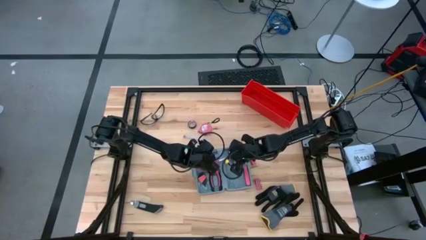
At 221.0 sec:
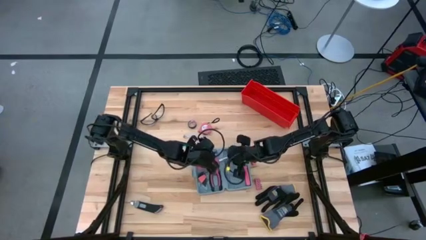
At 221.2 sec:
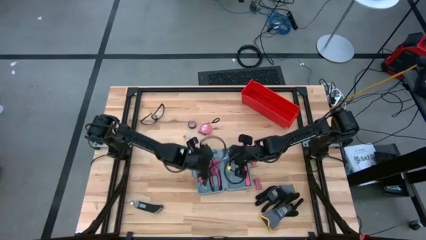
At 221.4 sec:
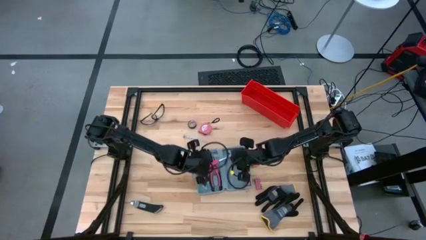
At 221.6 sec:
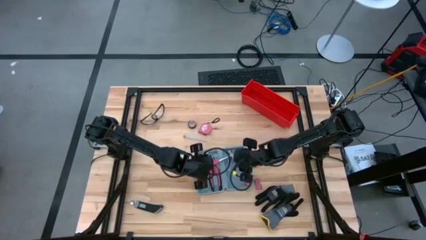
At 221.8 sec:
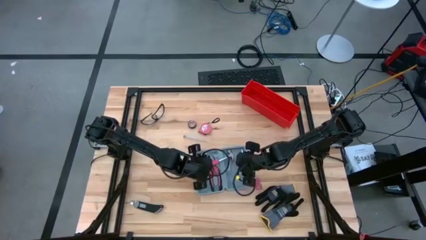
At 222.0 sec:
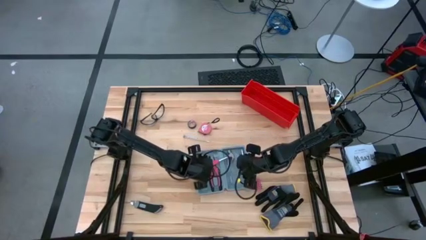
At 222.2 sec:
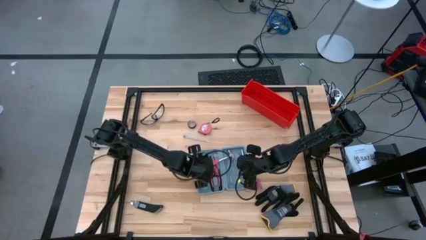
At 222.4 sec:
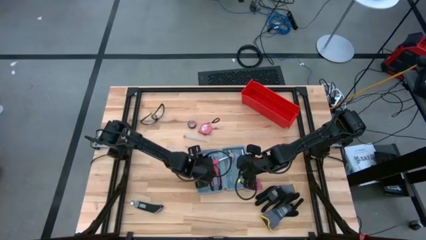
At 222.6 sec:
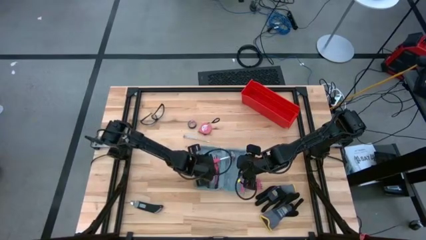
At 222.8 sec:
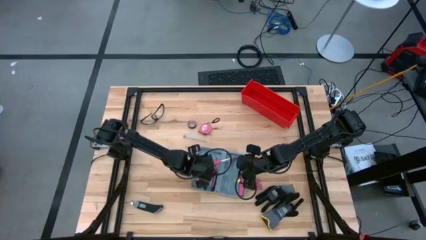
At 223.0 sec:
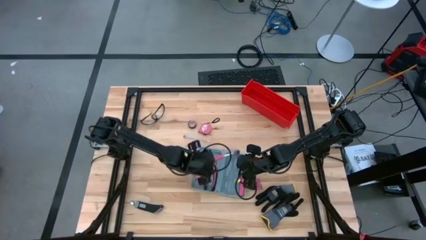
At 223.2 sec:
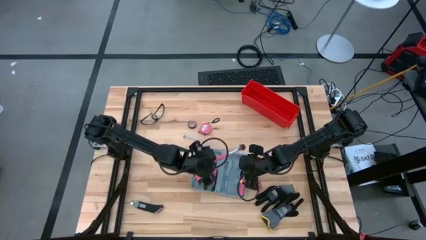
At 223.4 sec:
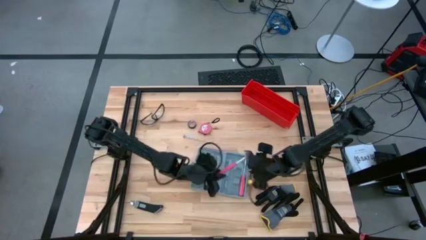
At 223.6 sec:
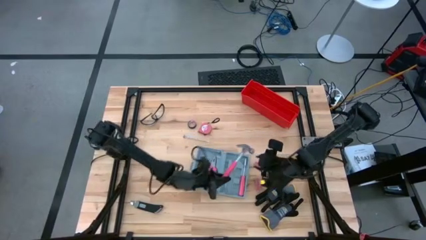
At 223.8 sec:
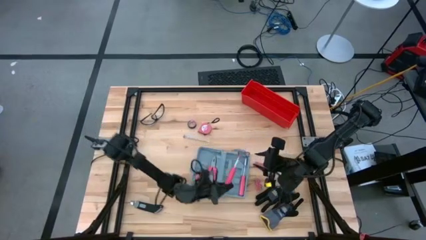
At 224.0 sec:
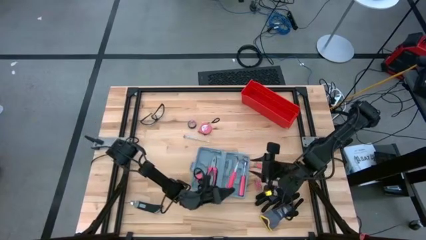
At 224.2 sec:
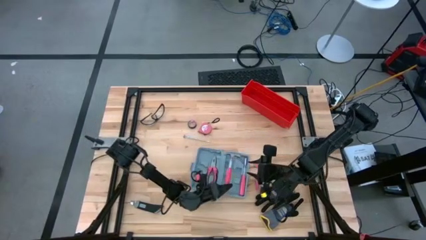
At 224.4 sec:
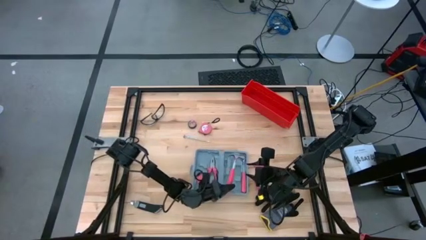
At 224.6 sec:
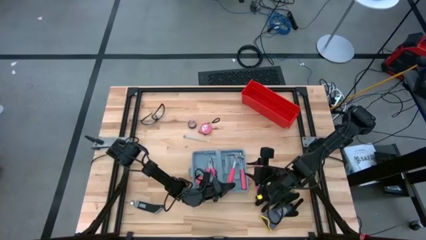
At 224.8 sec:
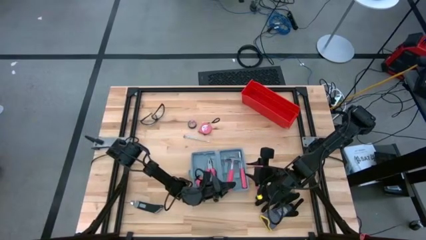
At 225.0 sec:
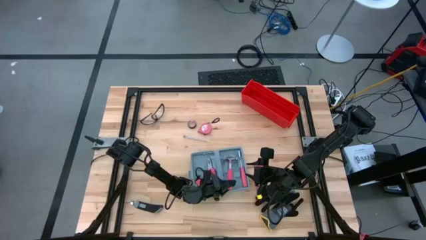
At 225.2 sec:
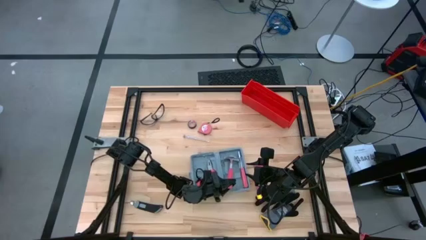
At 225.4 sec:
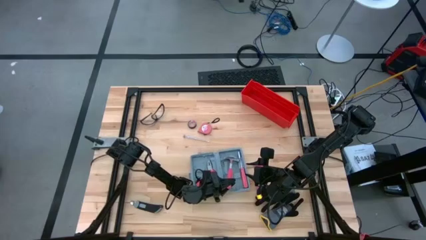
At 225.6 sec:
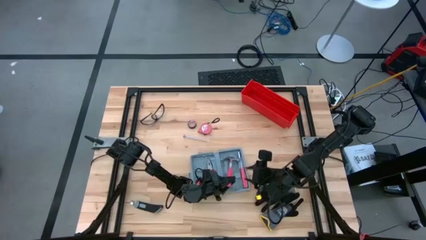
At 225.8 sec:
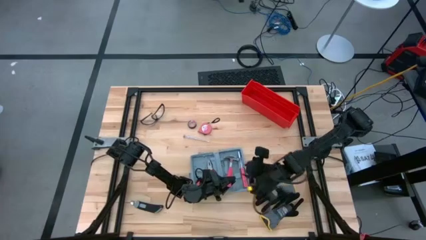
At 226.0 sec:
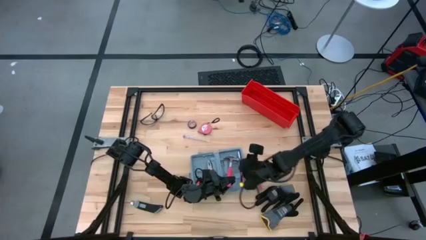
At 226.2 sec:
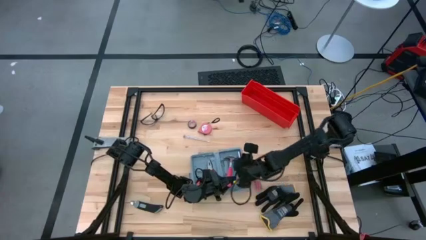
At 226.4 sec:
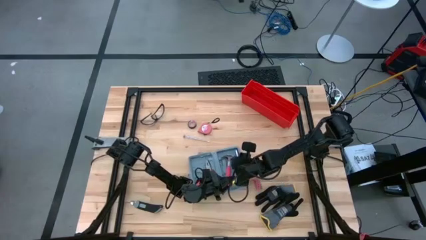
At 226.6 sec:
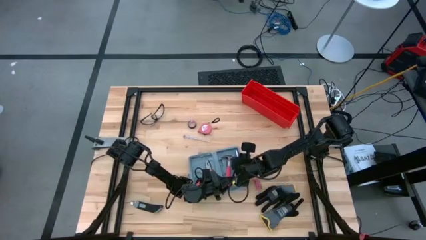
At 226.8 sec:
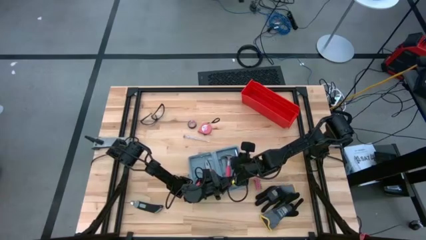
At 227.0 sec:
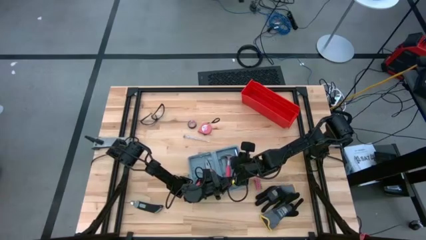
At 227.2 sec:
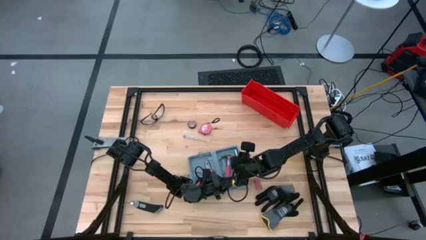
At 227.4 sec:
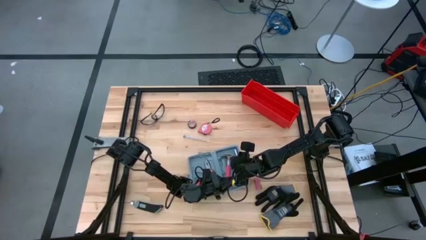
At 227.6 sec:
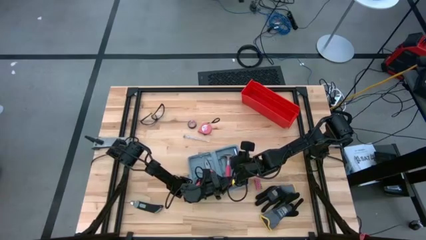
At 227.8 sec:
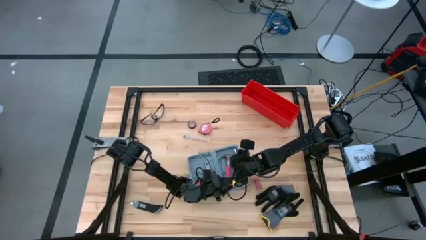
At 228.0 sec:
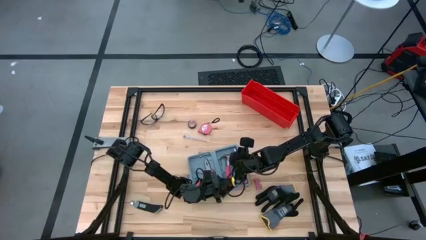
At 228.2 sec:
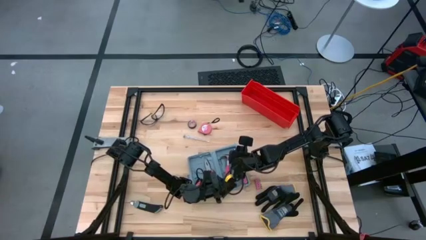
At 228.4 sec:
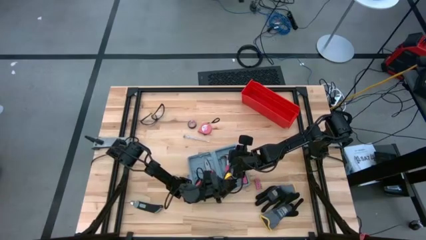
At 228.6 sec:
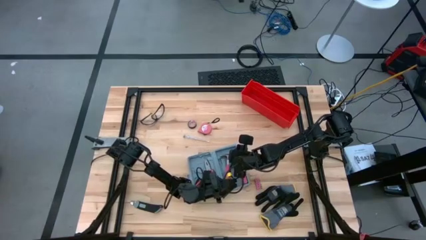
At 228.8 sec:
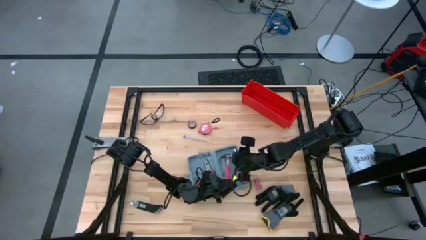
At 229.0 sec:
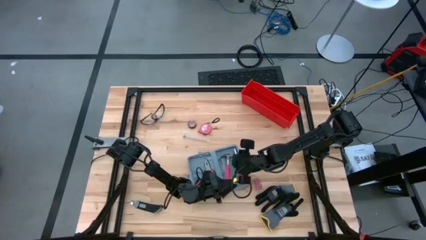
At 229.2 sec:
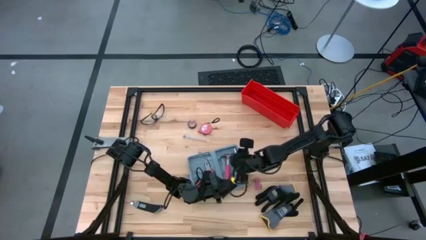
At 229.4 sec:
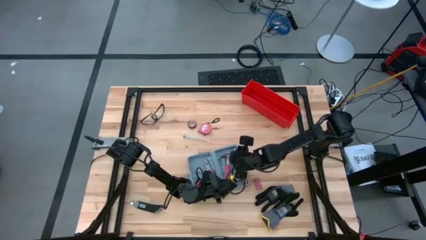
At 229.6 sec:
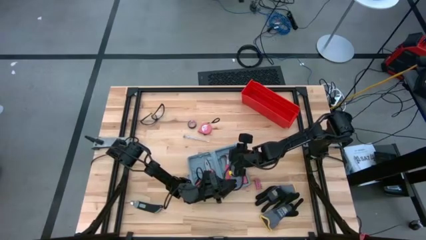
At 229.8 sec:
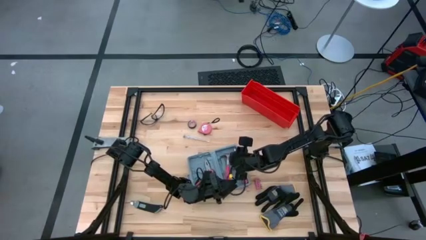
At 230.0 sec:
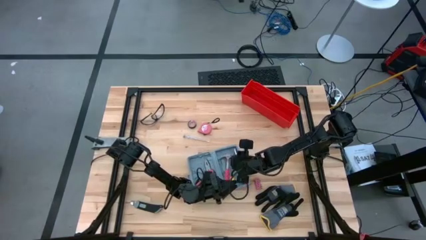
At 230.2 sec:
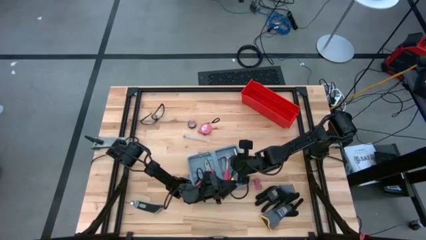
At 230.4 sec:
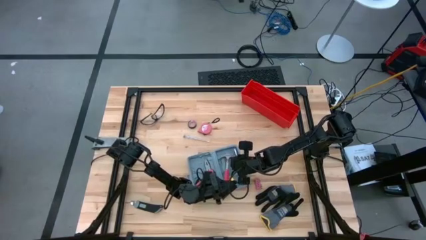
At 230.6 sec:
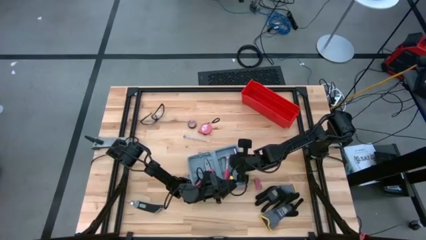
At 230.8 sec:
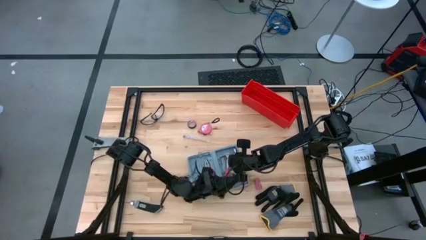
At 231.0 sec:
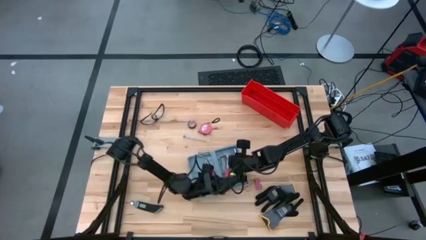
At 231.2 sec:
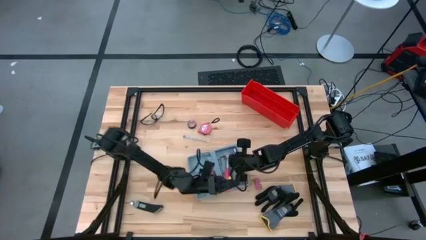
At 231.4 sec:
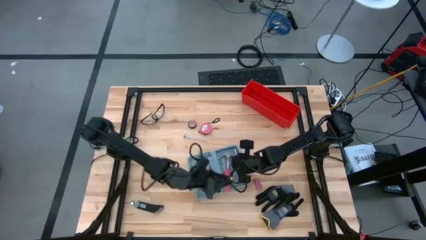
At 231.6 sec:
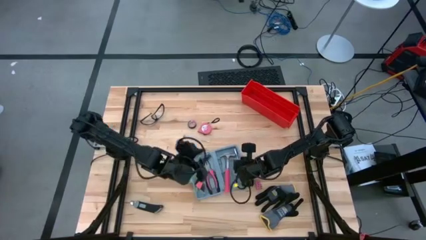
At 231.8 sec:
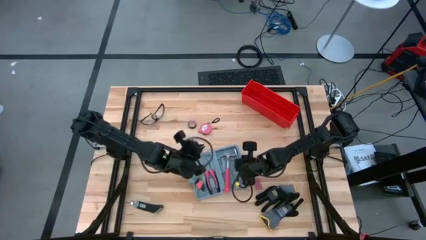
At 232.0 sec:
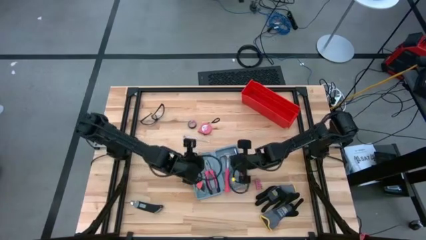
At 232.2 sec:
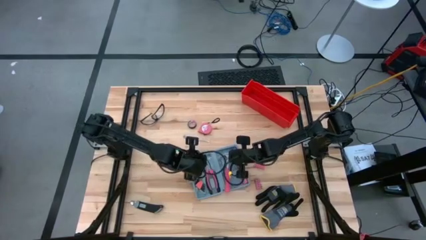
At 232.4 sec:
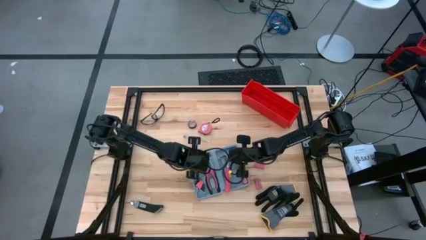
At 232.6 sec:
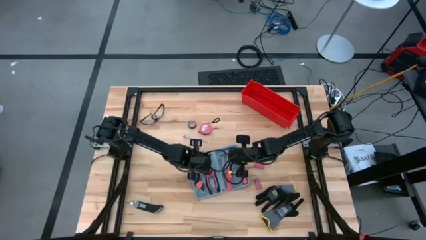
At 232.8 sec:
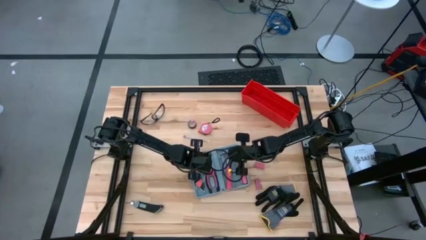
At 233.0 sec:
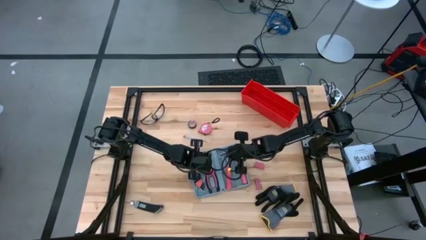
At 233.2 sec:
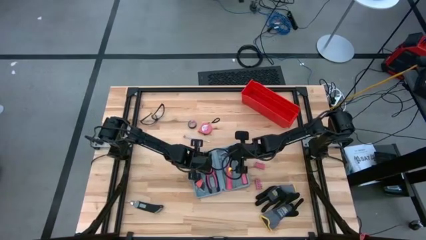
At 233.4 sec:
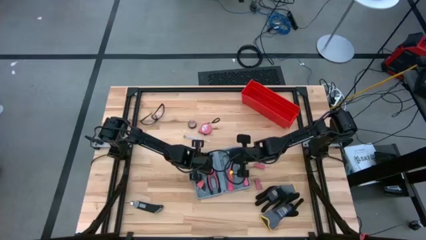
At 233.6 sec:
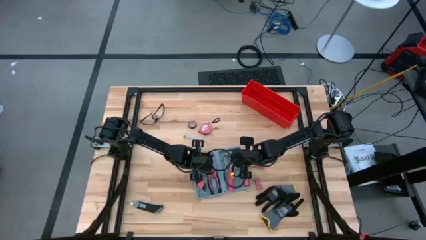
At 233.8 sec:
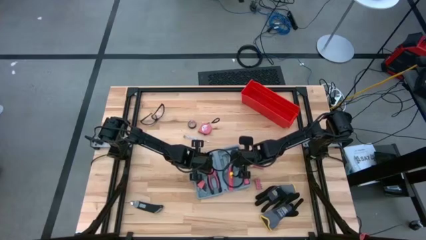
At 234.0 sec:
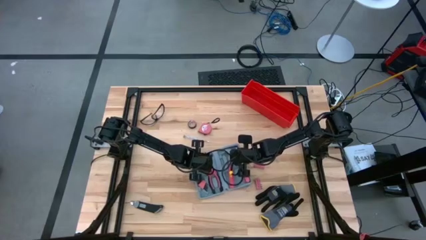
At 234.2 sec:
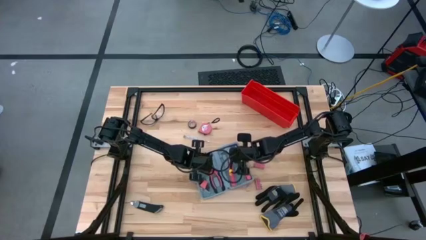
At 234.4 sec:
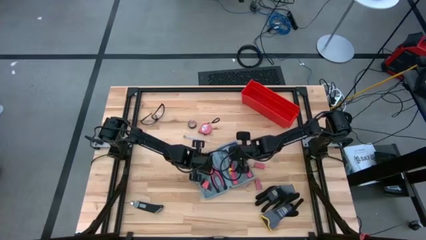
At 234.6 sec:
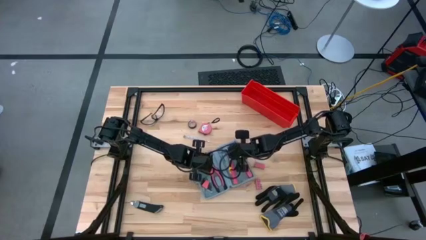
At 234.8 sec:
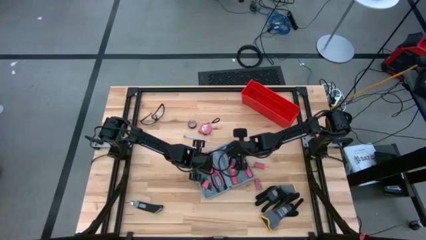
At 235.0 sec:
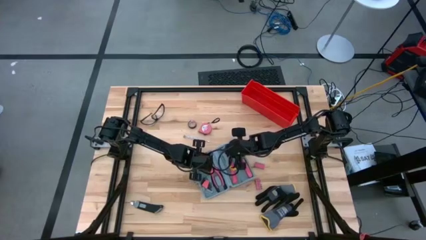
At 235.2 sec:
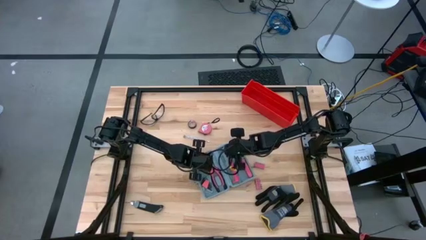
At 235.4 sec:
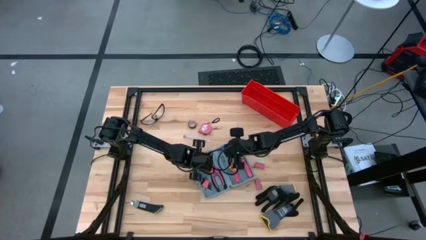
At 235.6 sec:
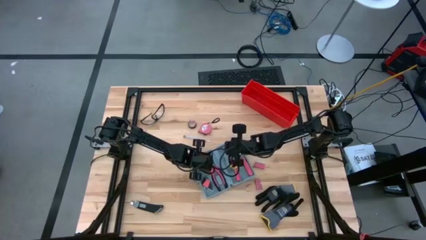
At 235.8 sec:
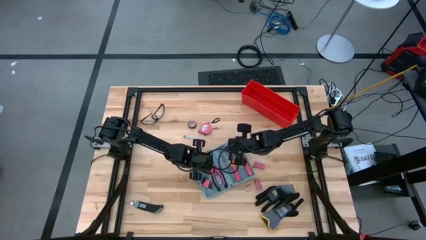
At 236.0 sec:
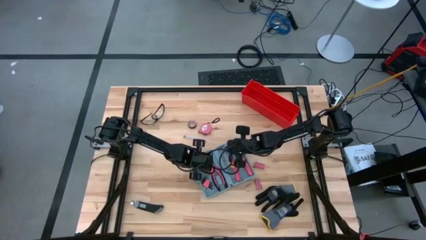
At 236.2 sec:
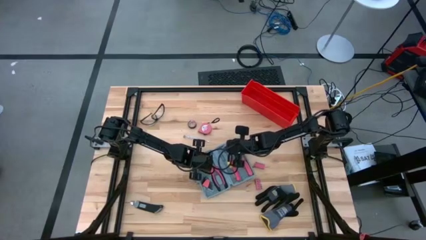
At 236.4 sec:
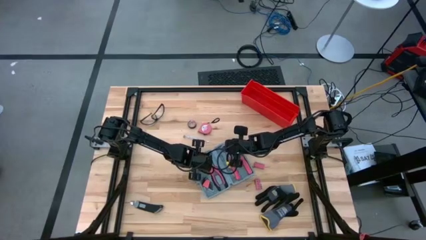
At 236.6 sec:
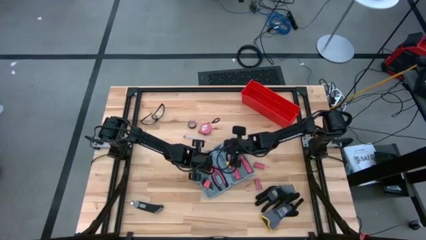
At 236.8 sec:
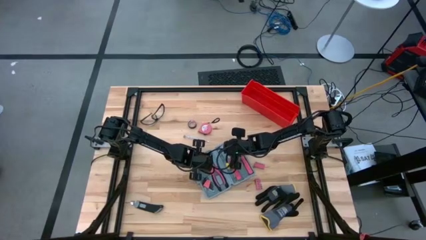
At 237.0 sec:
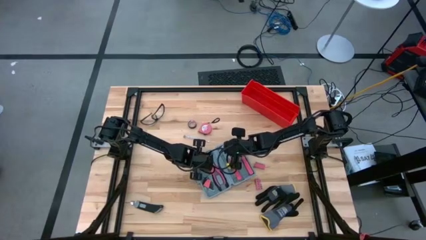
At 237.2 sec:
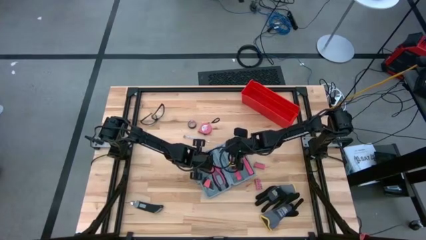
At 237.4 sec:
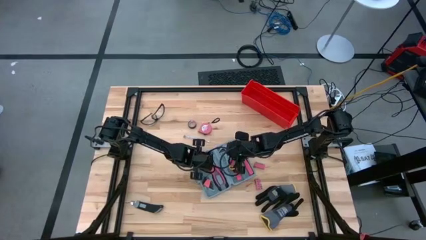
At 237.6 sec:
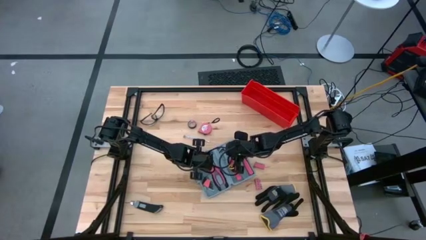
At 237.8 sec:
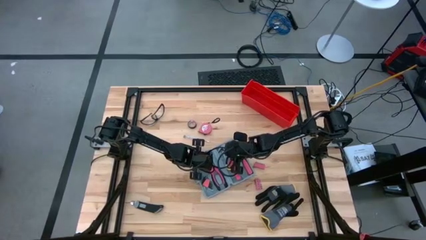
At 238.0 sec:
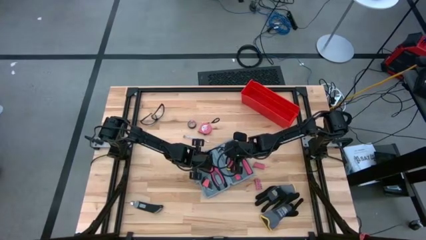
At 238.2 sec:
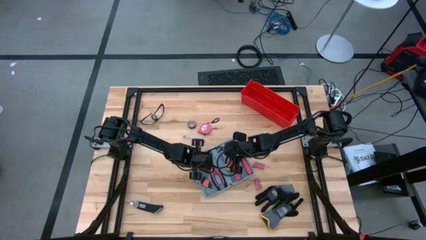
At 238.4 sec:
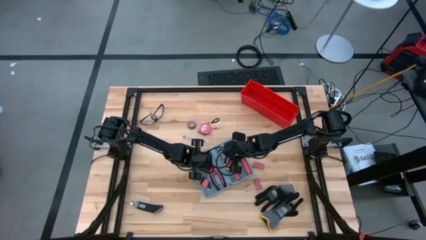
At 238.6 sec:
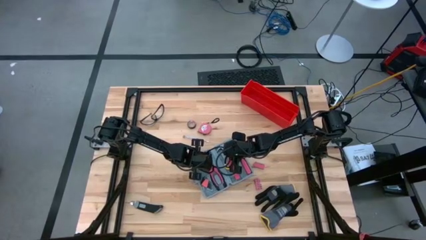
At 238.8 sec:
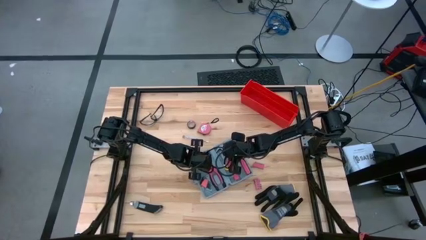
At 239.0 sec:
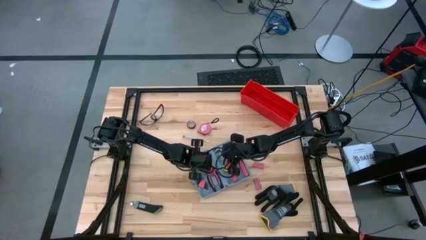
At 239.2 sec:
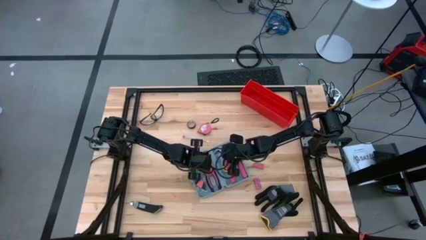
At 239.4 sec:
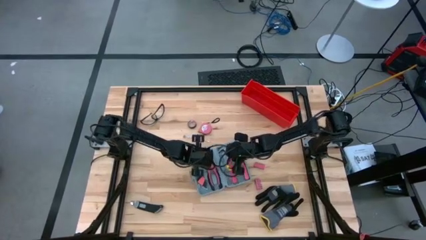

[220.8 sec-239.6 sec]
Task: prefit tool cases
Put the hammer into the toolbox
